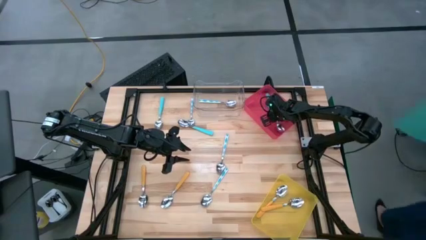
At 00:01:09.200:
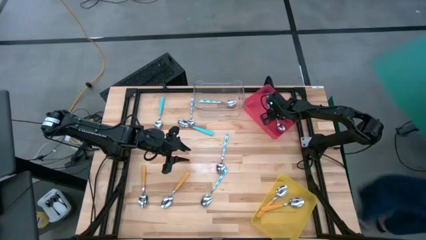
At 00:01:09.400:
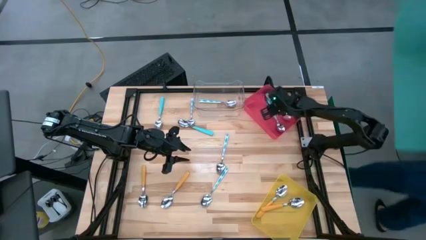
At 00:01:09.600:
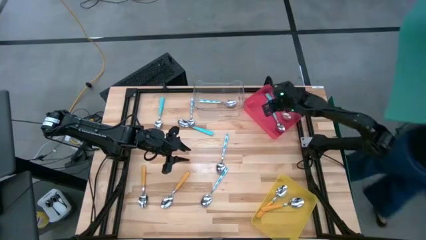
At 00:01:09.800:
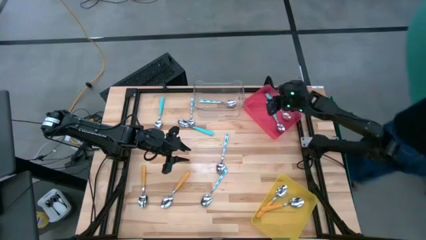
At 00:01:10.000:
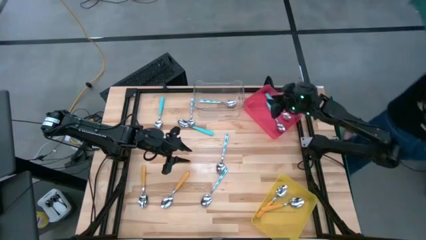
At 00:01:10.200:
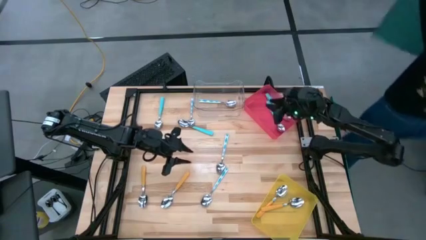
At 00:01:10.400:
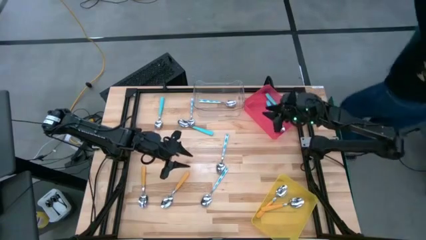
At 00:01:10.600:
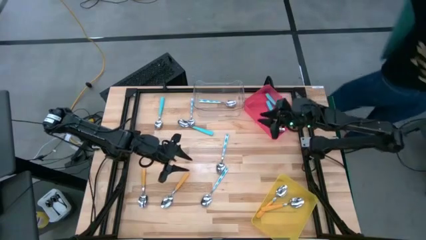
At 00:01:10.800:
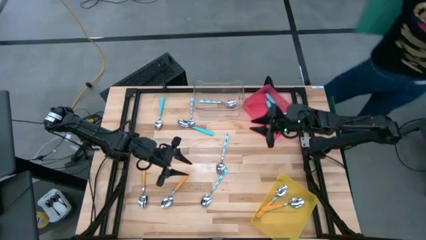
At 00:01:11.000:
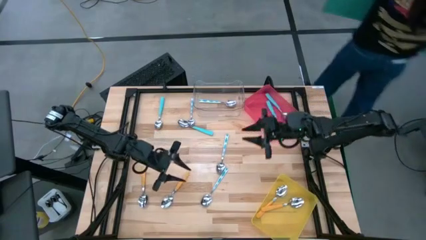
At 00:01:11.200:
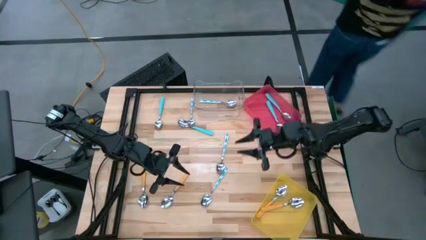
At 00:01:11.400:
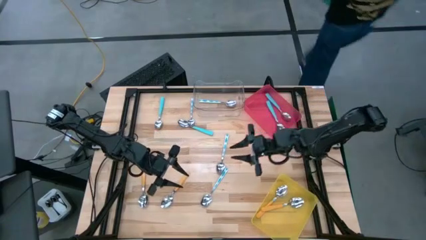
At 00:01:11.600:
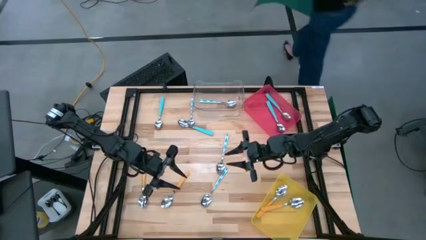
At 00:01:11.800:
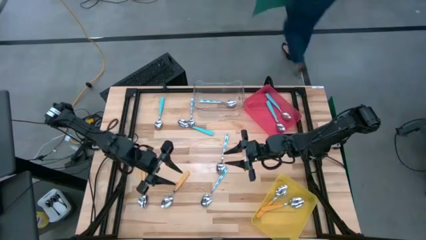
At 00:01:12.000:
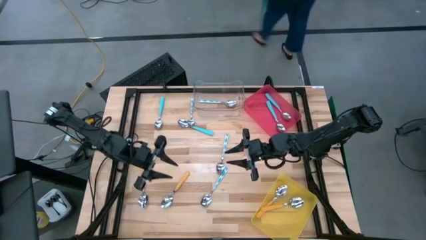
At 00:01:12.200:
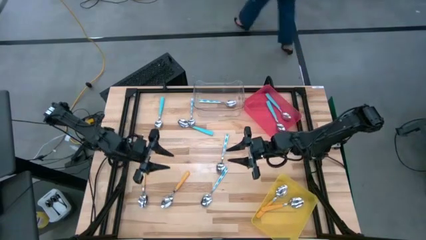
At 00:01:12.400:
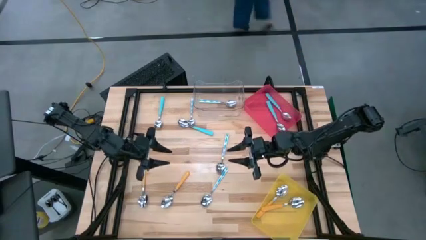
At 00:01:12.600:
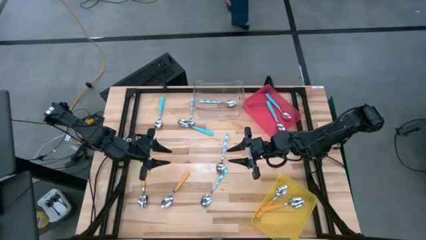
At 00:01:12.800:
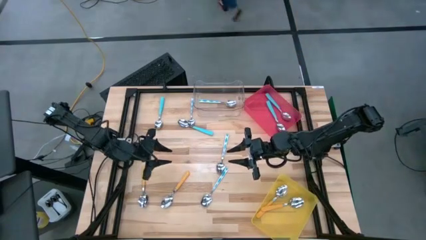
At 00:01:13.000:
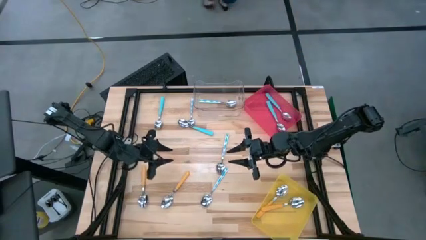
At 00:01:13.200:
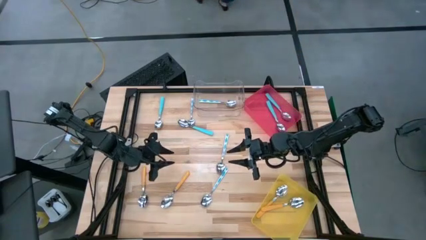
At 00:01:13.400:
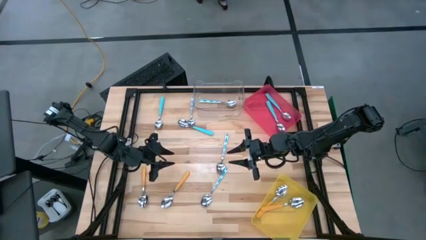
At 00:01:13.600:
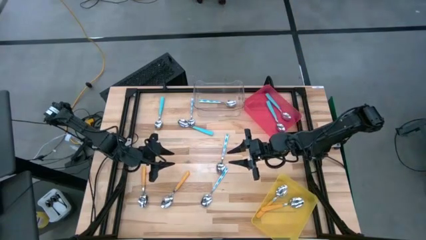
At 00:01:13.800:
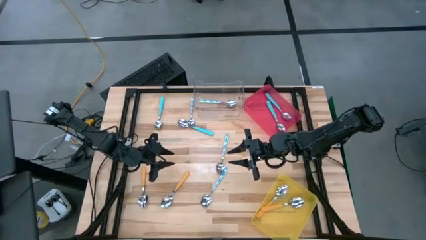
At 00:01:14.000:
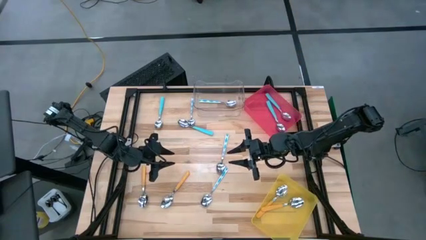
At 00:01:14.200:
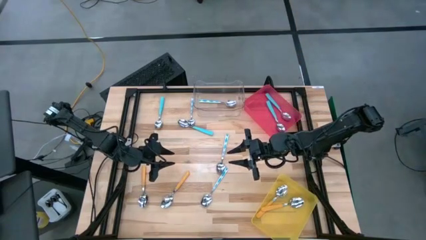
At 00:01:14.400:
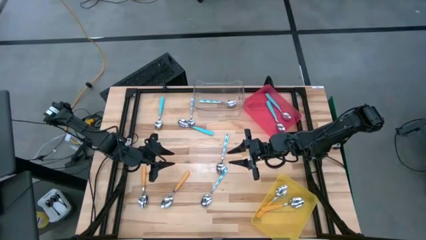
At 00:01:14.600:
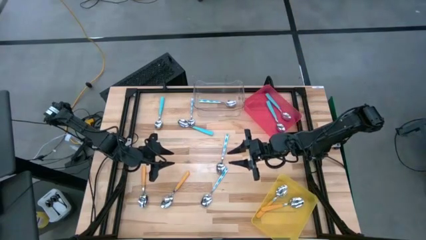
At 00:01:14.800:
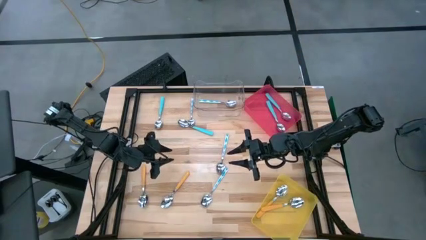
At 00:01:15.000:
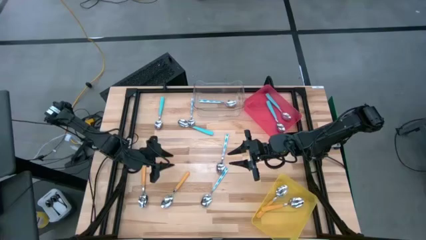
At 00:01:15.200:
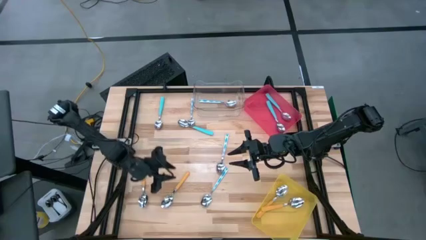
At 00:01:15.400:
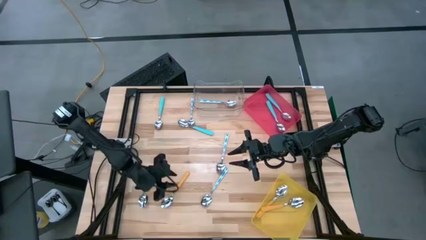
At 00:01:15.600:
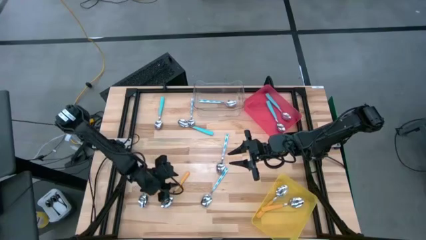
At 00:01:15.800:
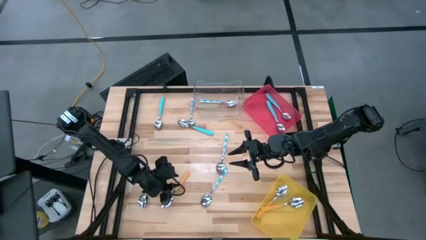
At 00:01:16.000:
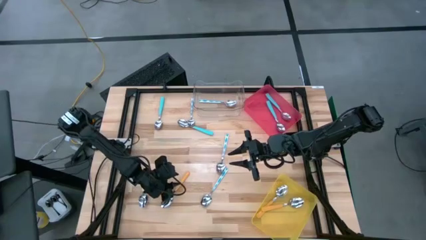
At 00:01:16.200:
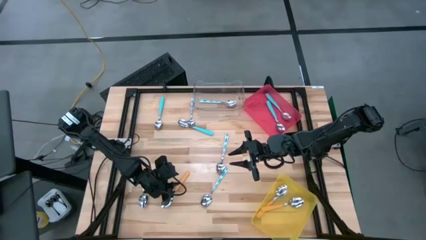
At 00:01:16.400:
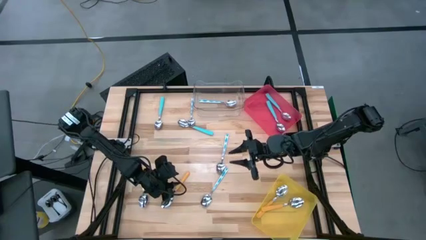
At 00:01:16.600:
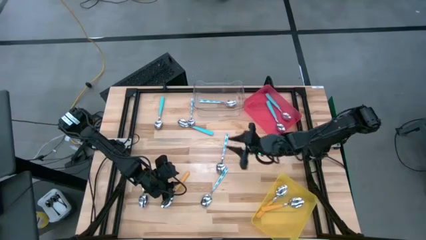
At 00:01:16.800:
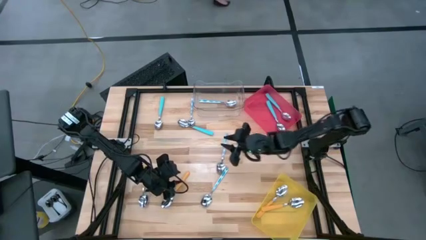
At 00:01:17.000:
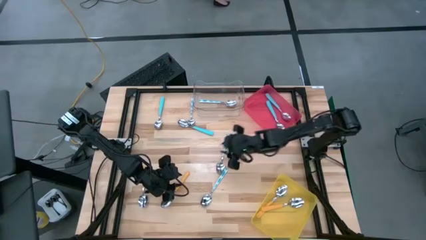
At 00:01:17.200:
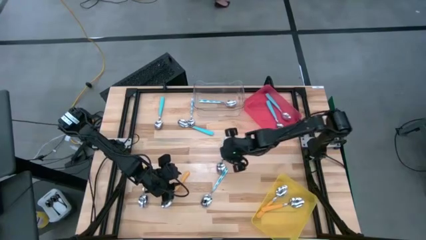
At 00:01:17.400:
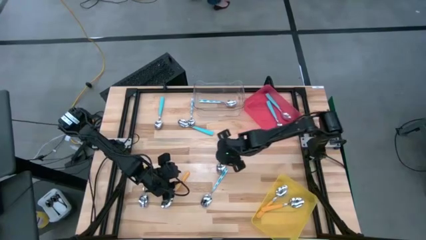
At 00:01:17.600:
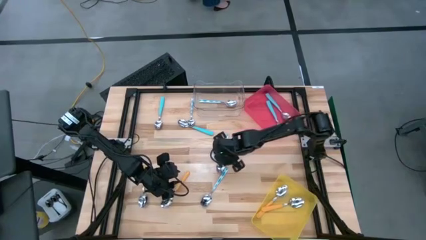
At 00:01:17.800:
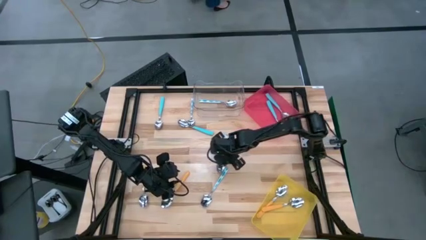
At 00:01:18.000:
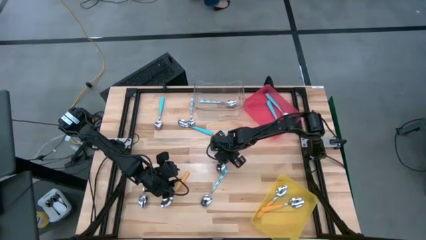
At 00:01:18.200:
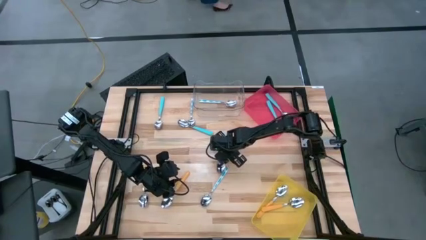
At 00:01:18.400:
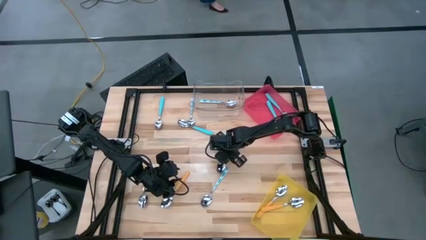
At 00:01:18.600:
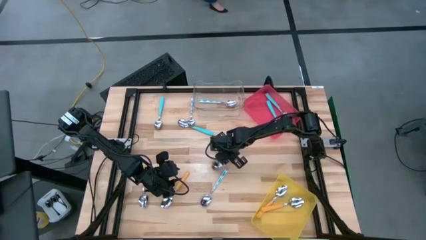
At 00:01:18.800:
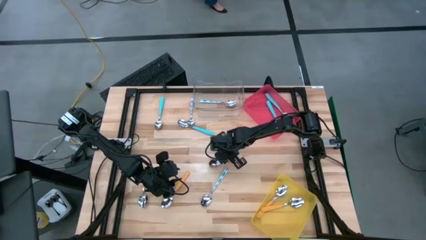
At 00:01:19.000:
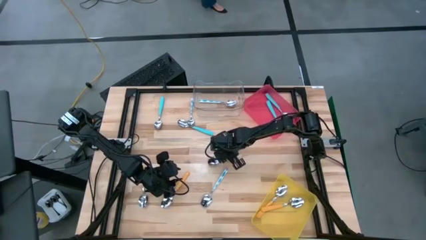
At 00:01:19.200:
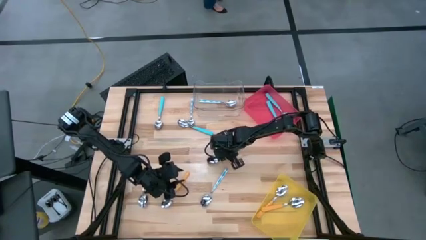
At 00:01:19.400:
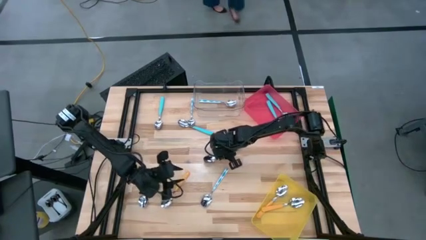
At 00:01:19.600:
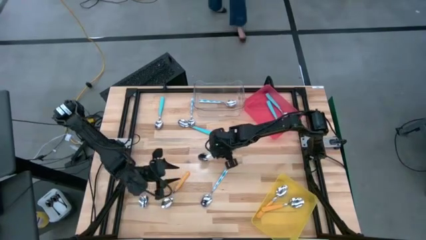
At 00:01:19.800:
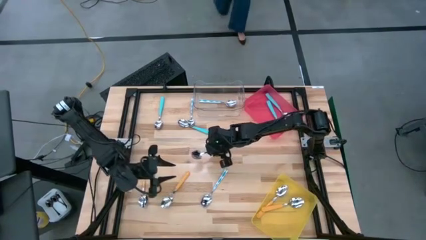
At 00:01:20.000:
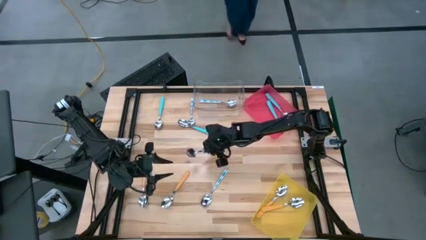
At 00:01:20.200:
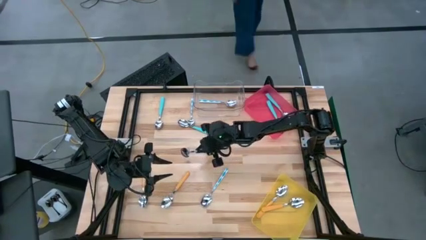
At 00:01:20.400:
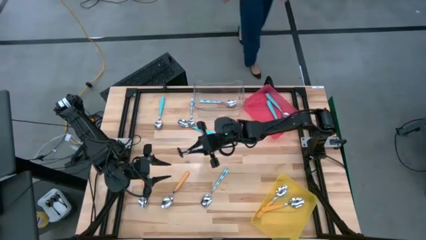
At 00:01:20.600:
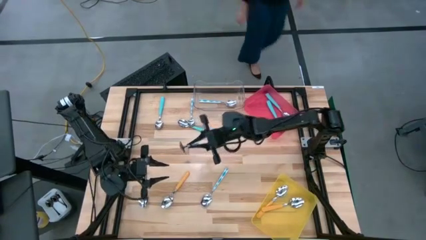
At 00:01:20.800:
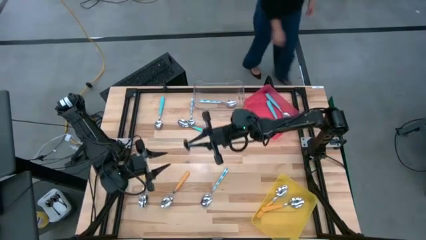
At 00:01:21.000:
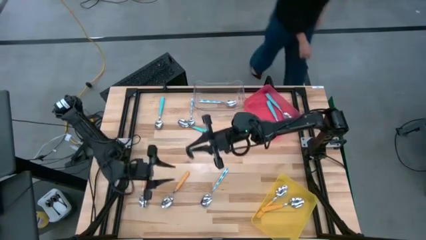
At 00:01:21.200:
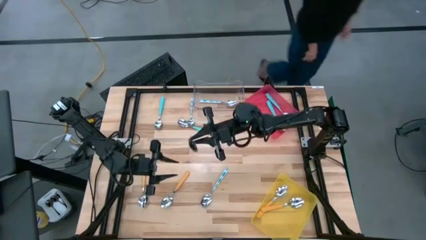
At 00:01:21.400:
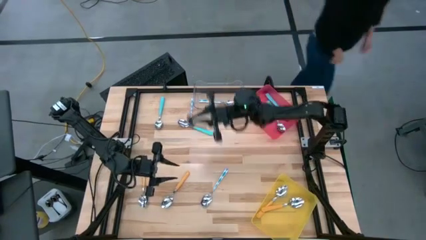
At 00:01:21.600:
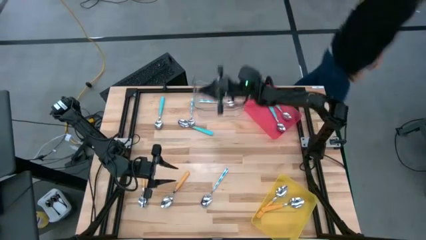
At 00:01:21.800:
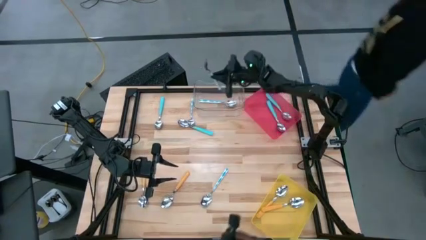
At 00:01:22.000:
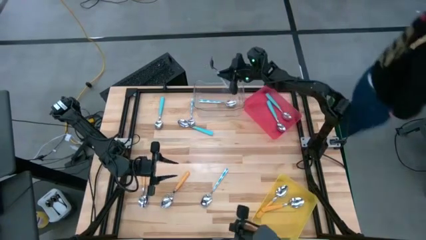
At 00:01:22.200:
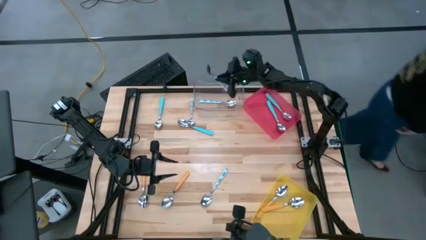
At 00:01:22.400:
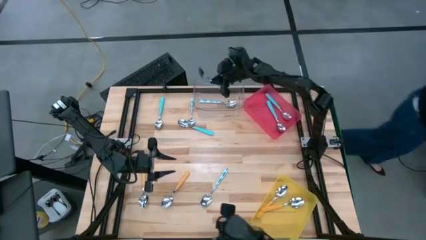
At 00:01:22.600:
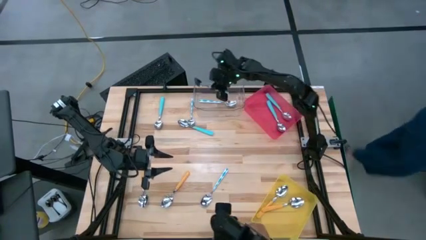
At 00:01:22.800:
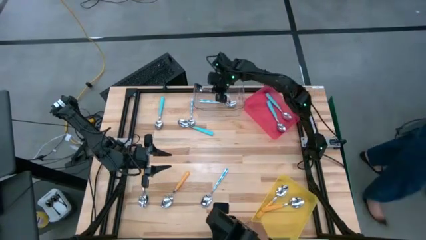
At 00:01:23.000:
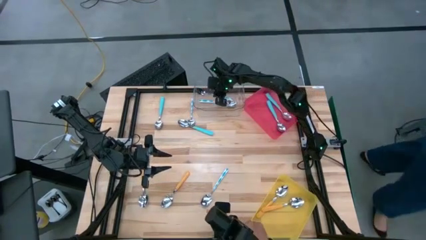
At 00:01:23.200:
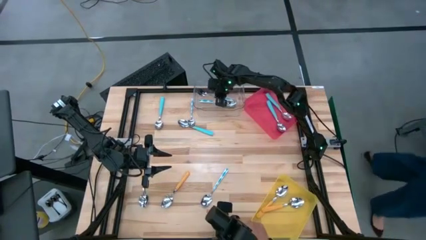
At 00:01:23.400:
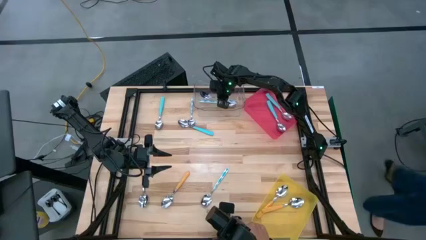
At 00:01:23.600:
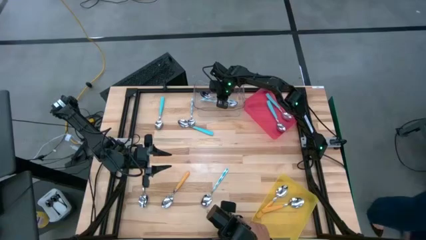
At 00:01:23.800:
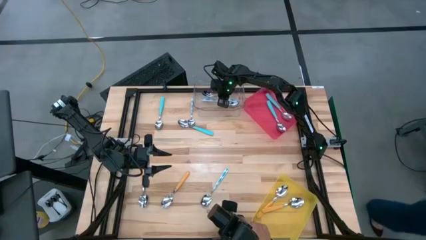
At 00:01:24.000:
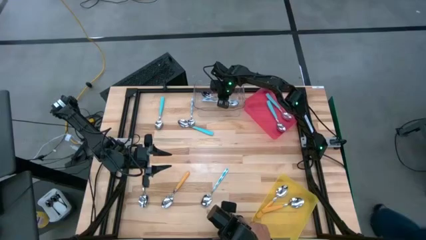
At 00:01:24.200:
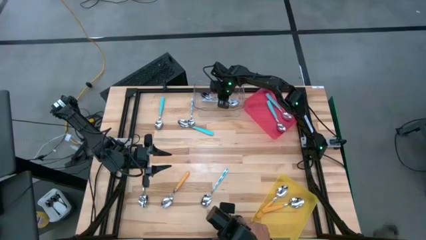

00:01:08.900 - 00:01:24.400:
Task: Sort silverware by color (type)
Put the white-blue spoon into the transparent bin
